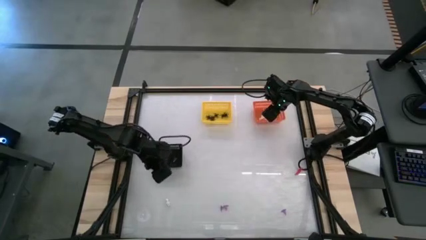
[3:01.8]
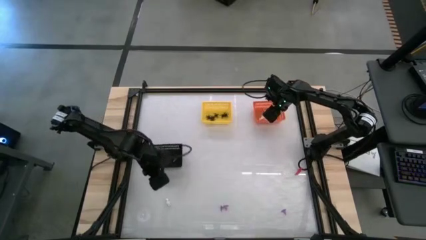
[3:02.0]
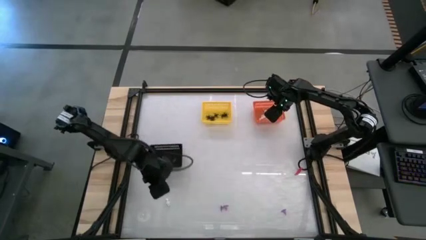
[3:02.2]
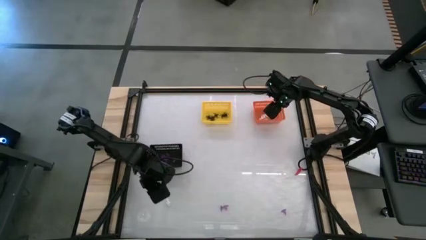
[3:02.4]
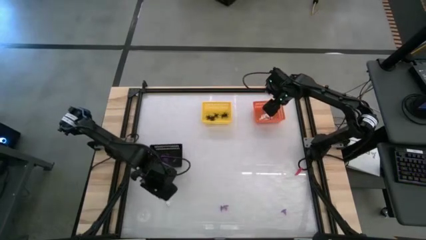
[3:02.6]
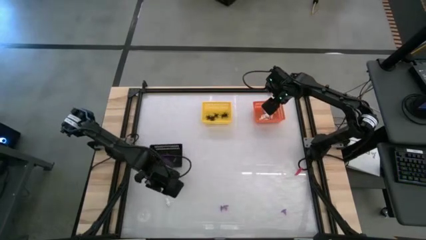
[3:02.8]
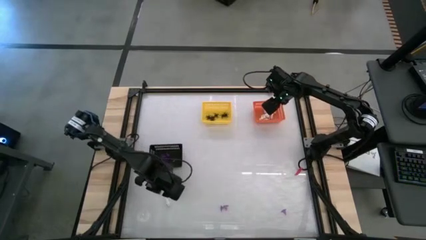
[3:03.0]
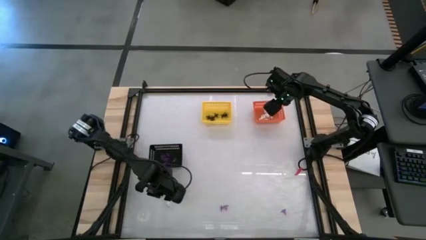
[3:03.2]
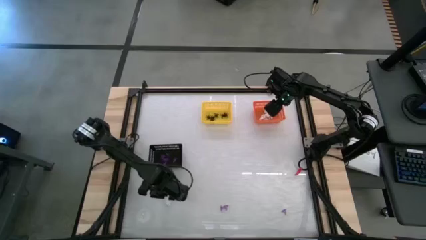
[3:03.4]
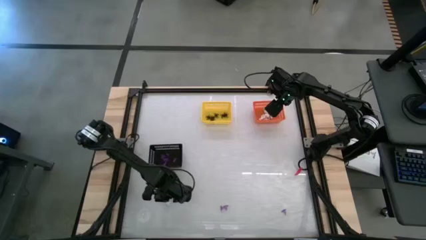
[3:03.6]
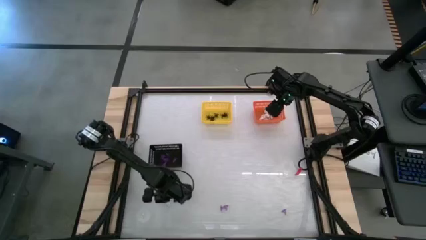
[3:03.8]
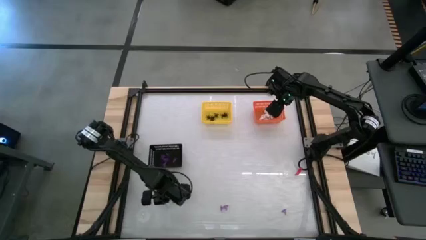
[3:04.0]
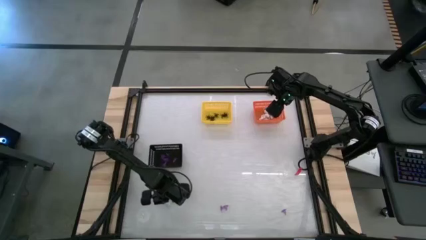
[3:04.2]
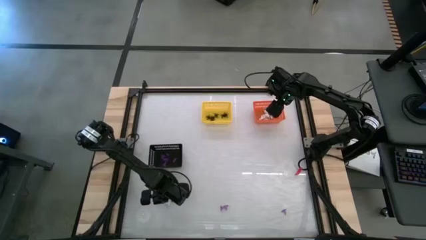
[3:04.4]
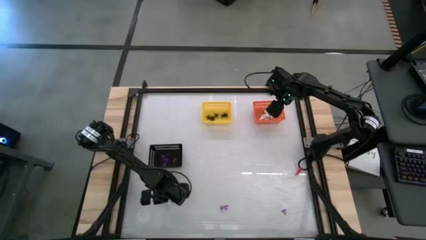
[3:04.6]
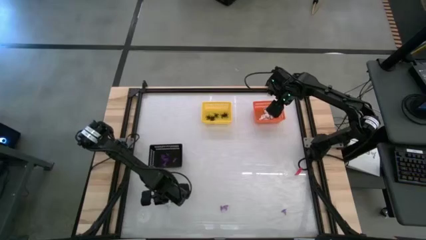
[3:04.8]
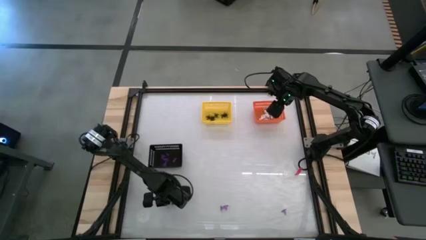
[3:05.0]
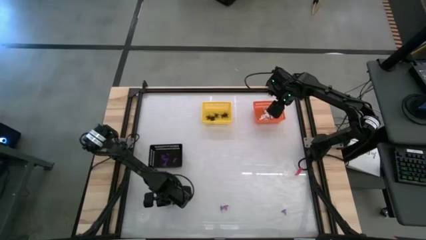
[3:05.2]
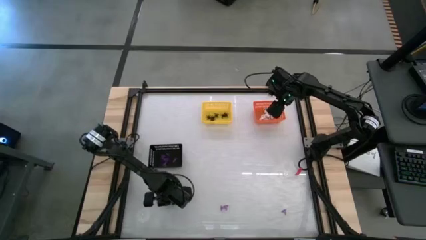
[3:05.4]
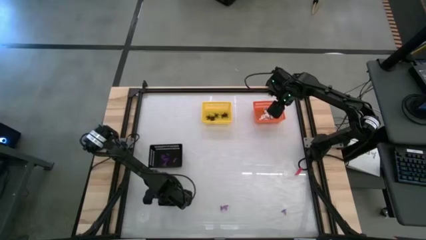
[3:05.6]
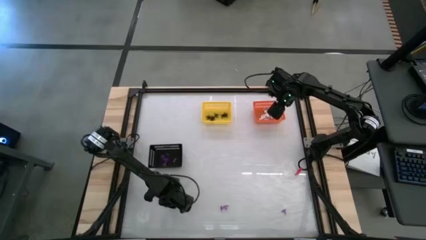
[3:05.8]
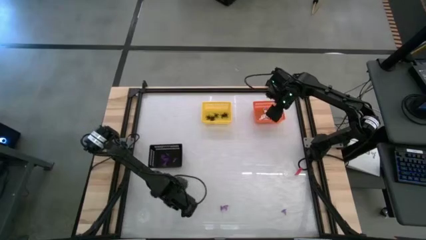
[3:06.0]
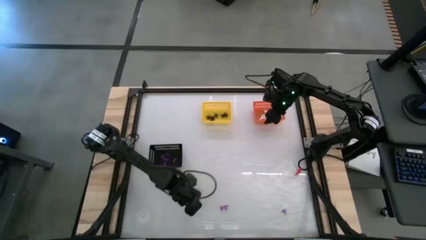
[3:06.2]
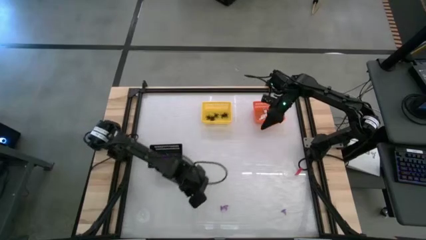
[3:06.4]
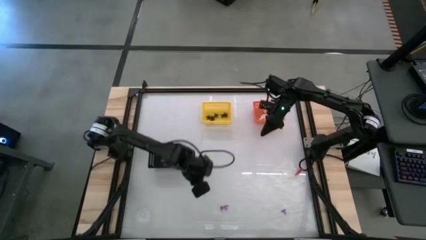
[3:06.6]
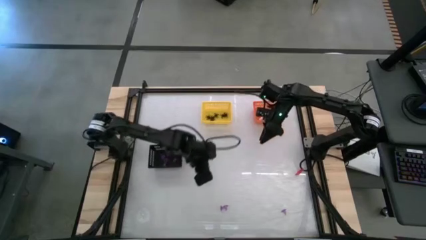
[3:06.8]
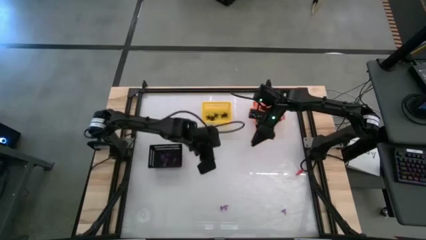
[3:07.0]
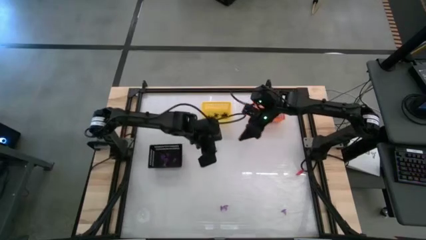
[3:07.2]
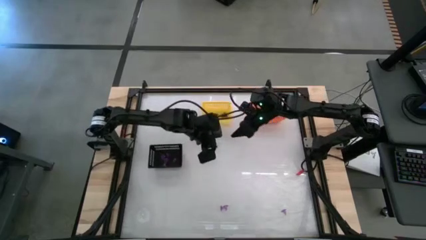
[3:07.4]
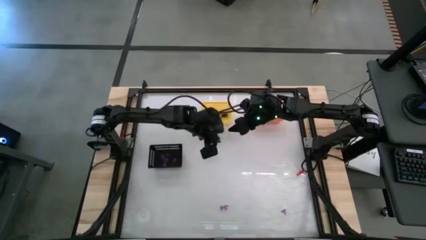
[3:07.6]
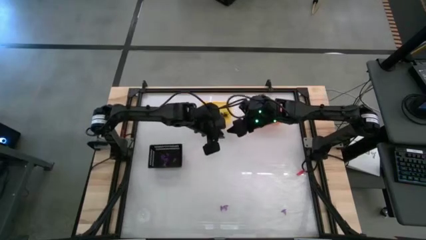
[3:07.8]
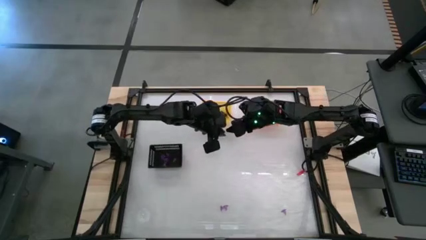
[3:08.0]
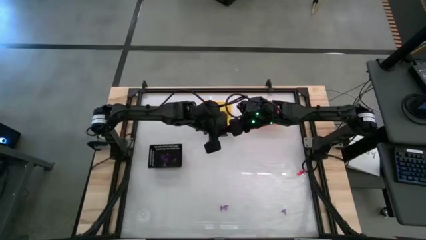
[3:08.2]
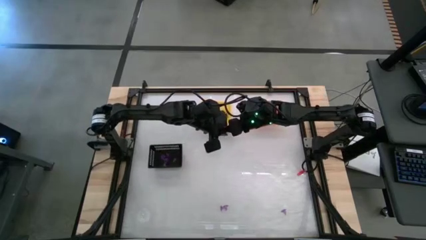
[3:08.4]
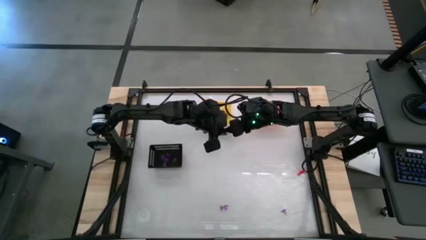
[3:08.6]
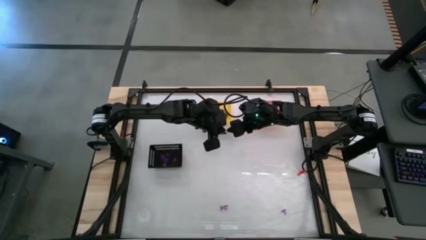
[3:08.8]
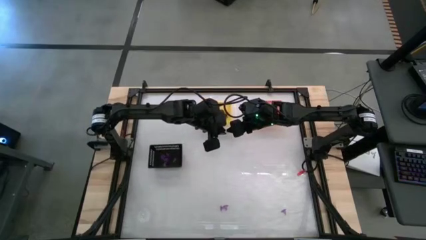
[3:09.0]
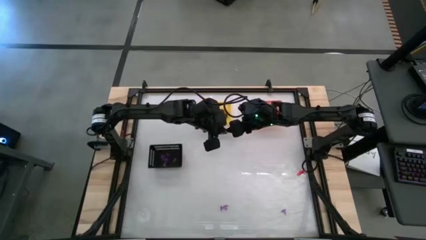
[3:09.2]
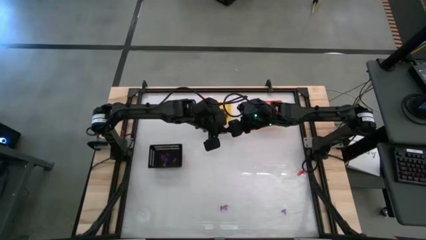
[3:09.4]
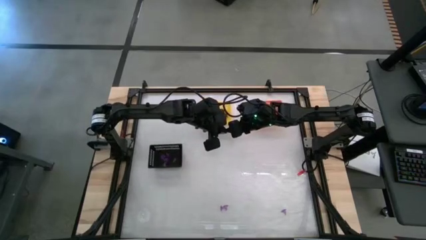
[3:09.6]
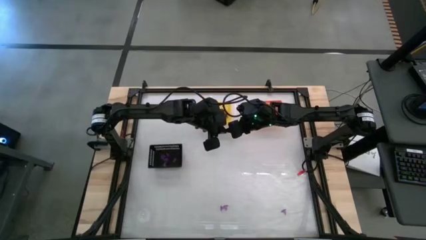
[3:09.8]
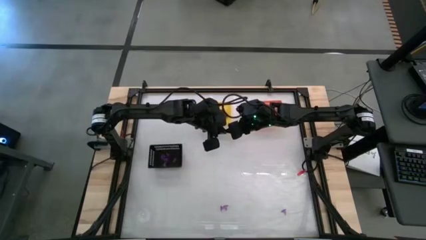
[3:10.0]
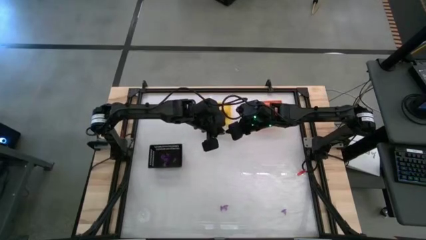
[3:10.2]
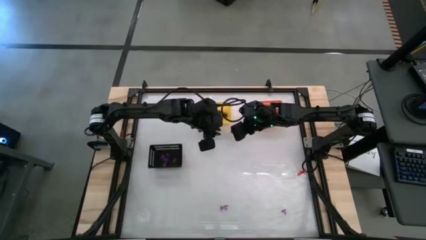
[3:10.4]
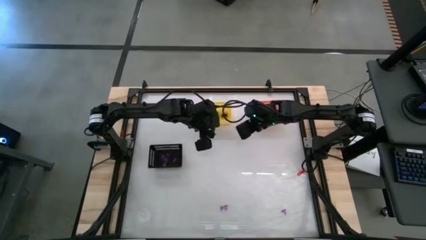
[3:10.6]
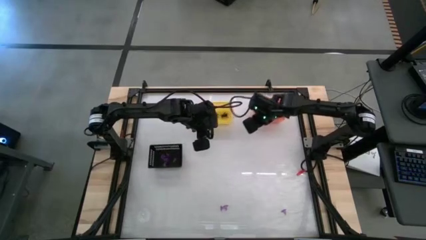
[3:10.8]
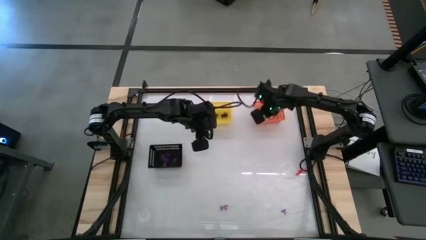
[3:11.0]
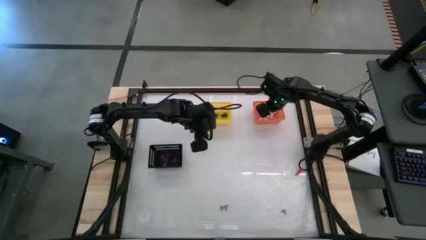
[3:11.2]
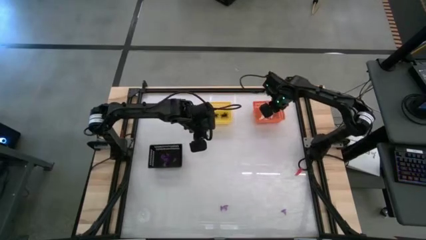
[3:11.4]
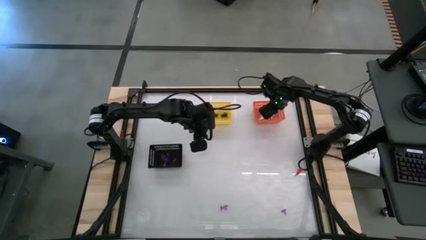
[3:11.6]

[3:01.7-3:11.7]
Task: Sort Halloween decoration
Put the white skeleton toy into the orange basket

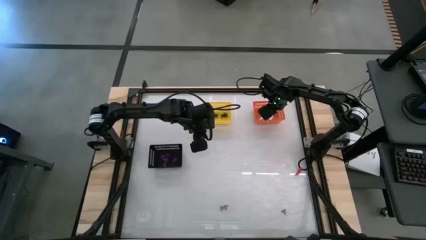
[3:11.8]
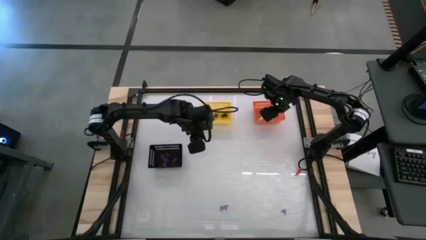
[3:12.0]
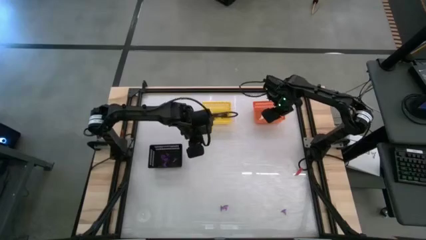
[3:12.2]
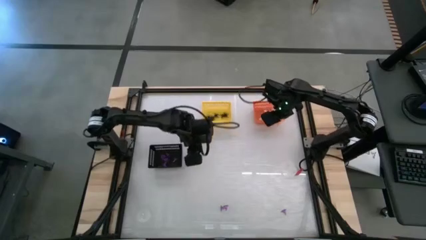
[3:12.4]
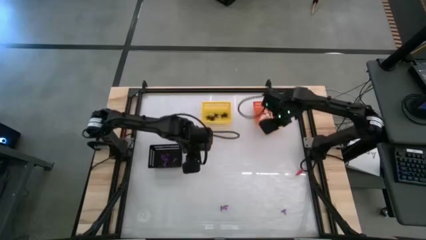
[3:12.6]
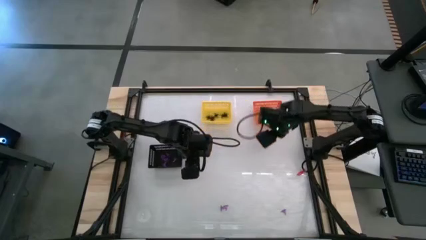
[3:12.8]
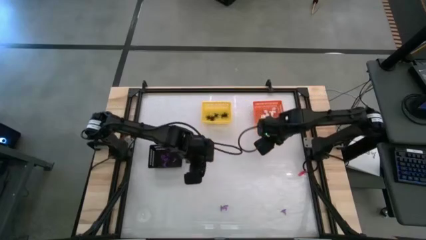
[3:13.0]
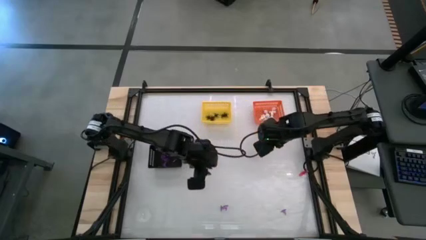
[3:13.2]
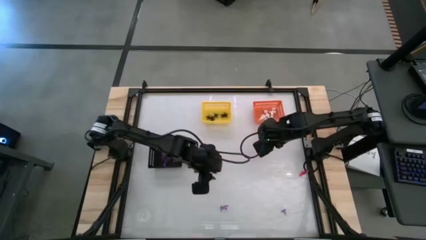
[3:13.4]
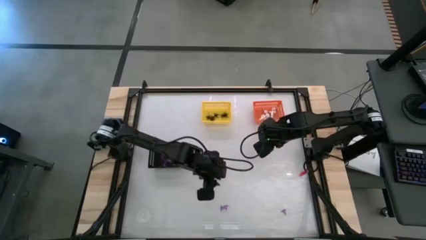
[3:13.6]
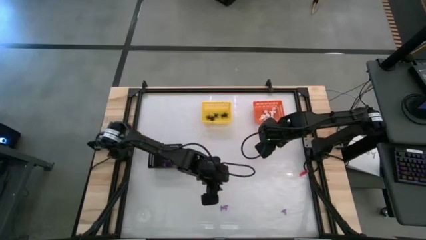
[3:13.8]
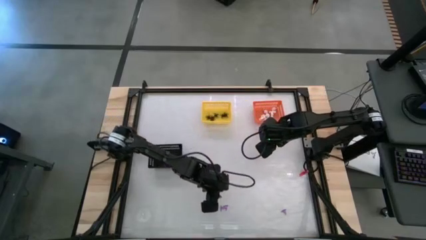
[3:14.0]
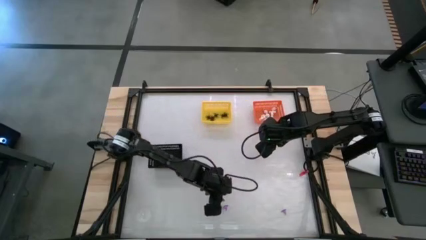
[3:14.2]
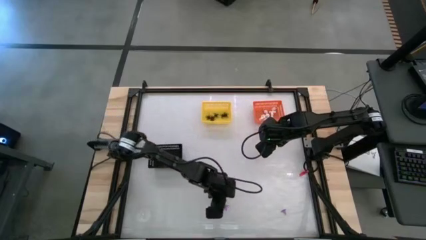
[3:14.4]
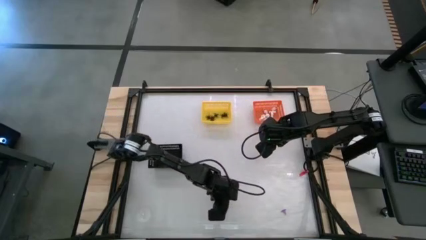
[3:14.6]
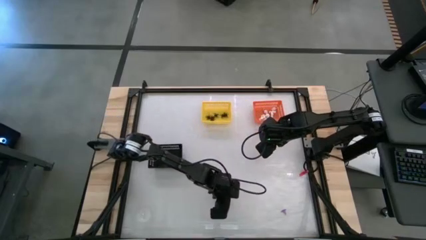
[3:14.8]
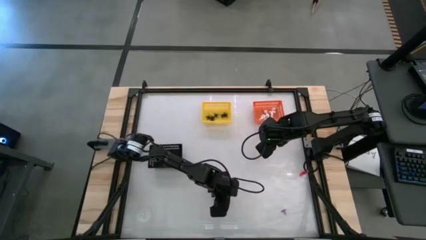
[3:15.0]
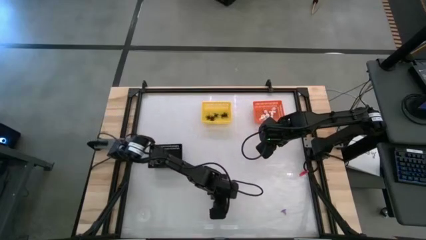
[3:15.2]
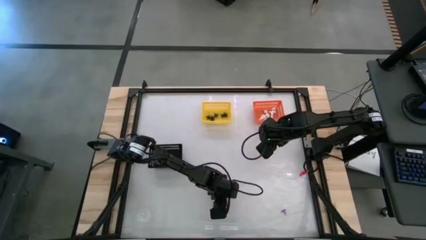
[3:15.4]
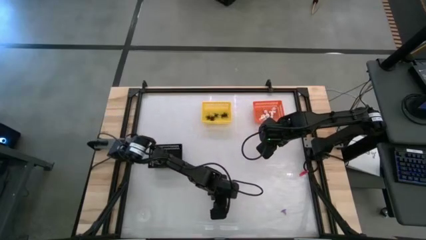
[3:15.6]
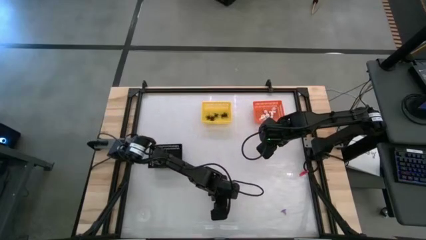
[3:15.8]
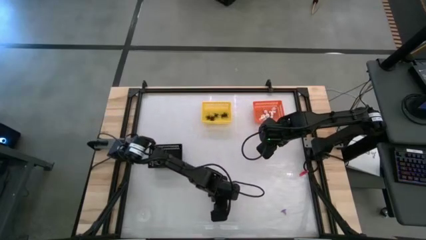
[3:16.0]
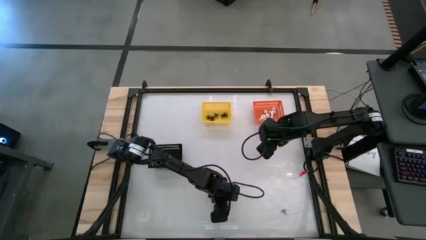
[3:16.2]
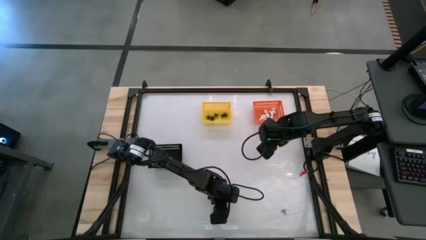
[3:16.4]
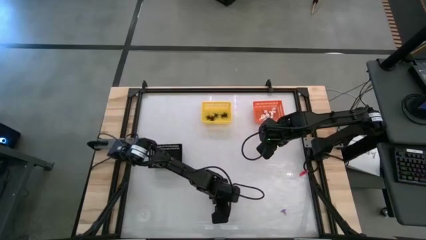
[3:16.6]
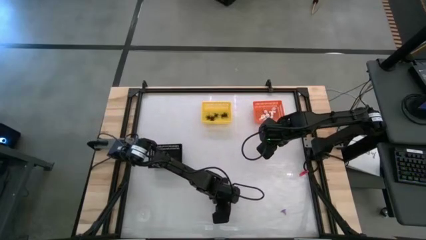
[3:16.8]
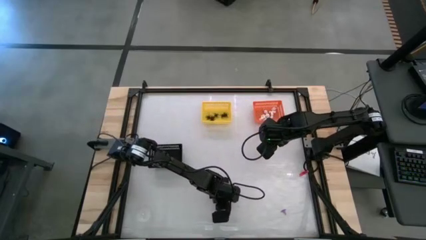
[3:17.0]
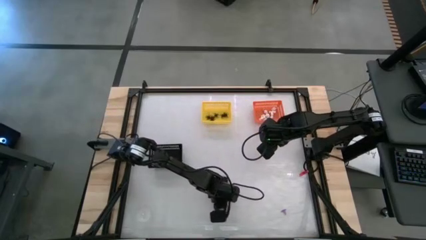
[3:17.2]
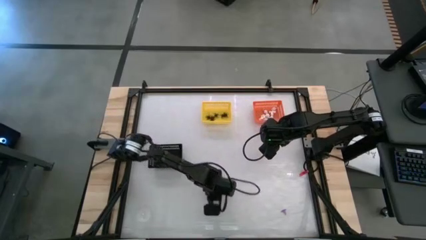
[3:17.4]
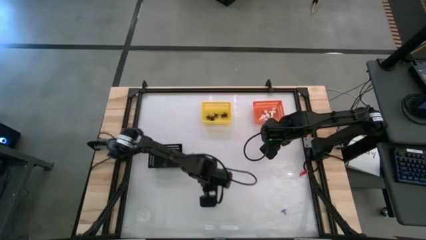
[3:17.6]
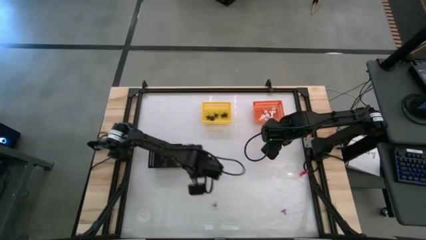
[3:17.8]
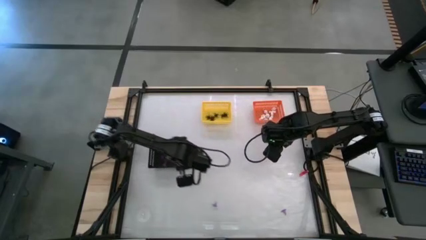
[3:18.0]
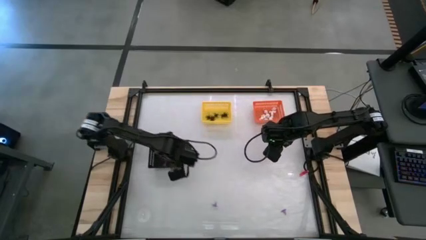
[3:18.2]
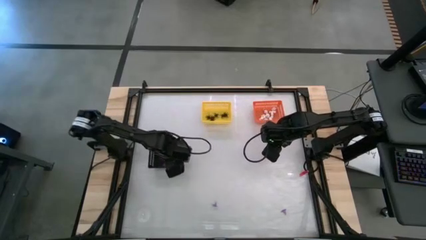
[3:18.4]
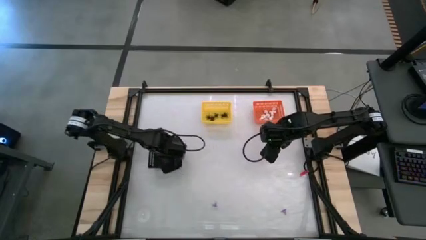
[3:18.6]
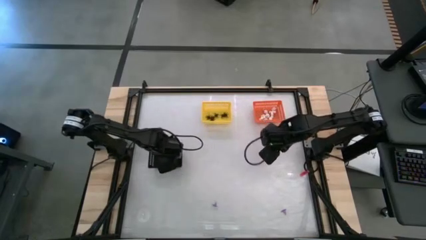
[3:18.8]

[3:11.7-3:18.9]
Put the purple hat toy into the black basket
